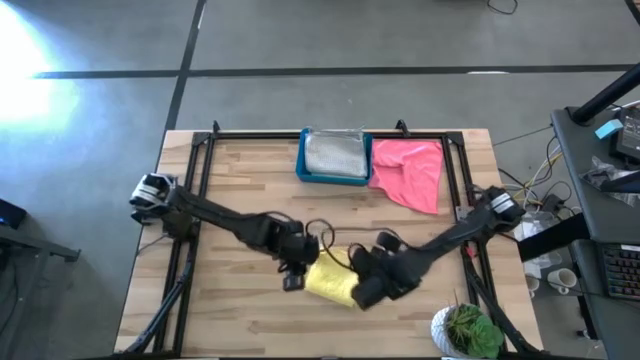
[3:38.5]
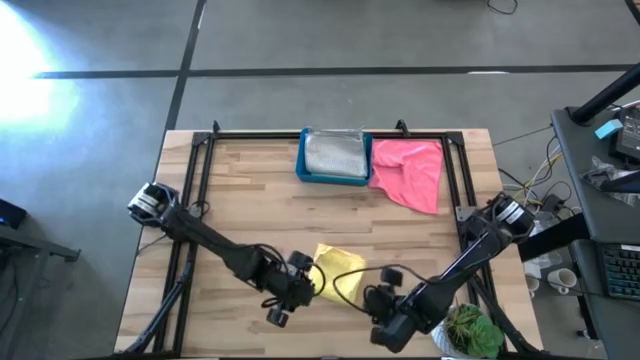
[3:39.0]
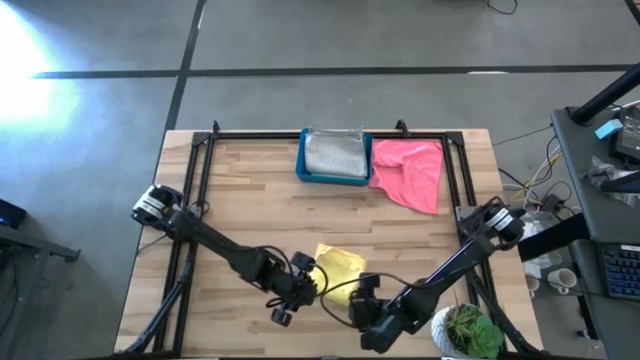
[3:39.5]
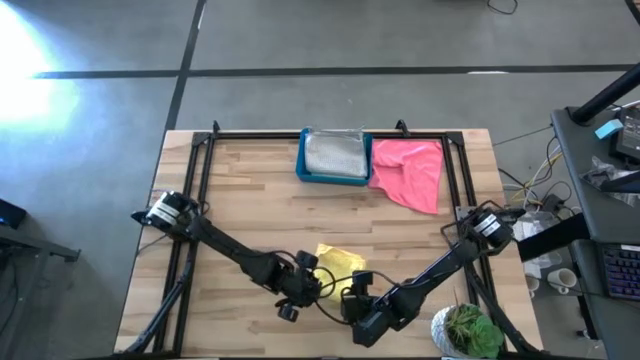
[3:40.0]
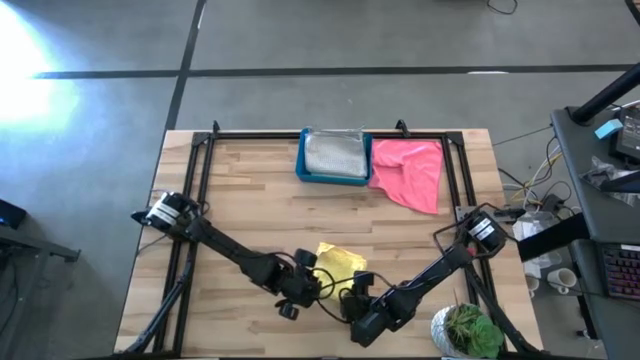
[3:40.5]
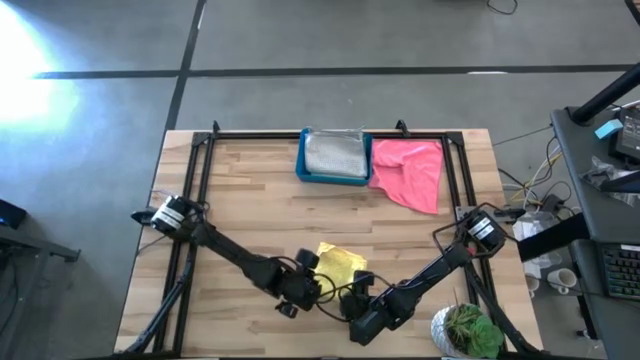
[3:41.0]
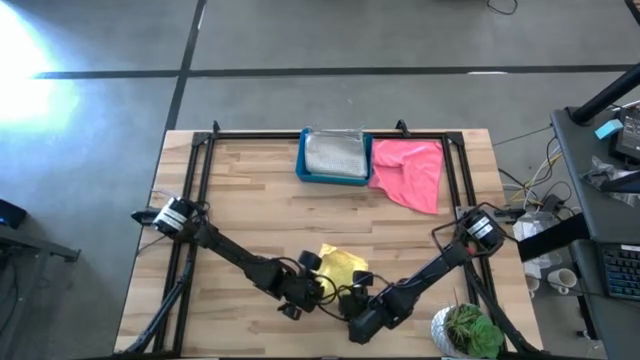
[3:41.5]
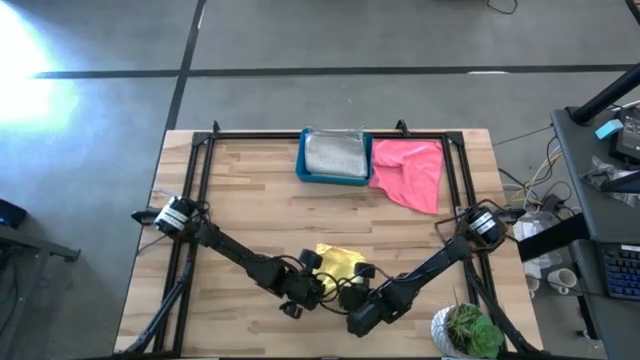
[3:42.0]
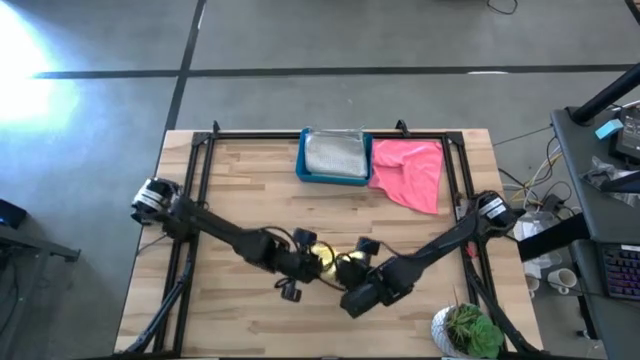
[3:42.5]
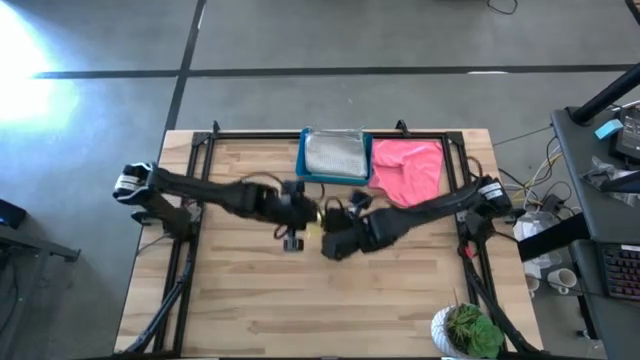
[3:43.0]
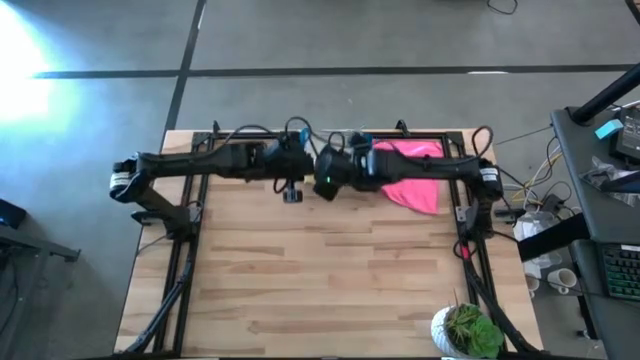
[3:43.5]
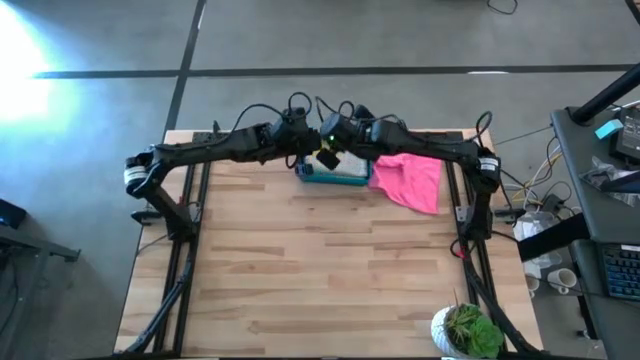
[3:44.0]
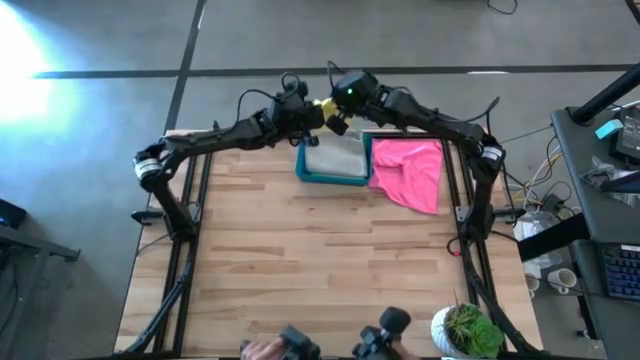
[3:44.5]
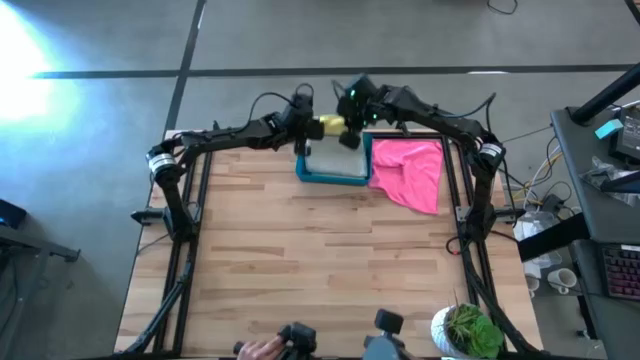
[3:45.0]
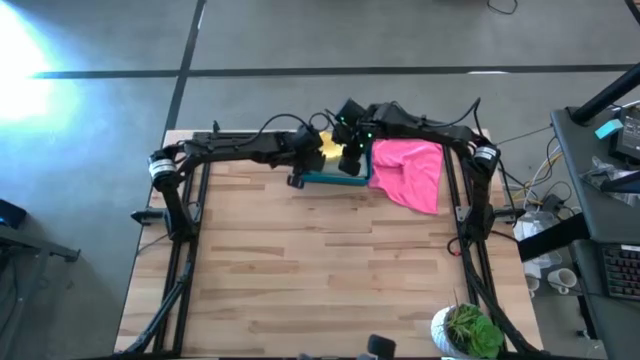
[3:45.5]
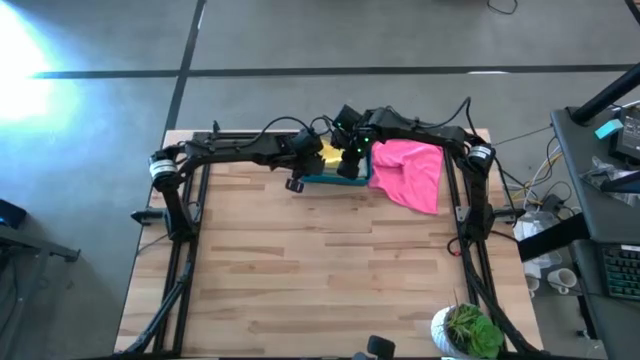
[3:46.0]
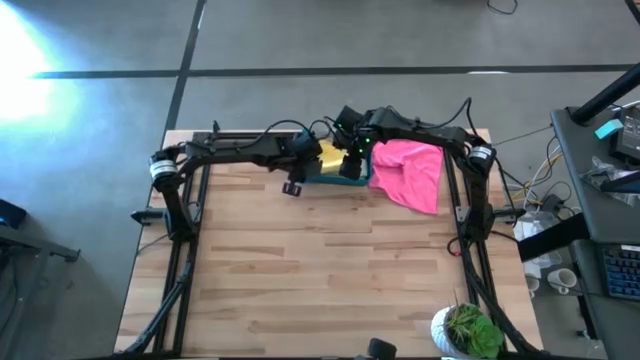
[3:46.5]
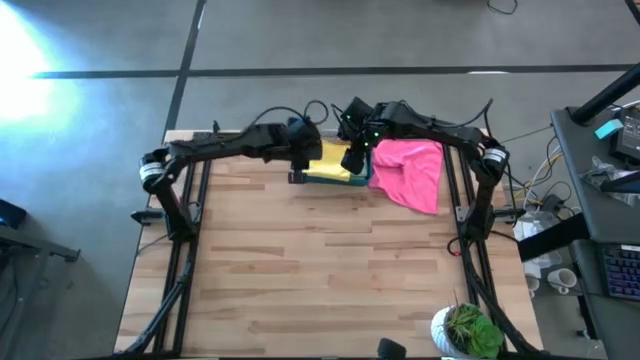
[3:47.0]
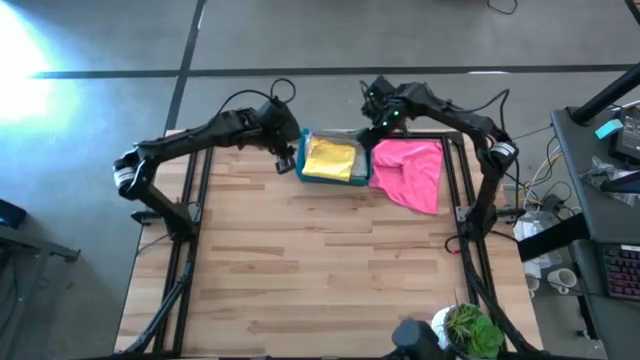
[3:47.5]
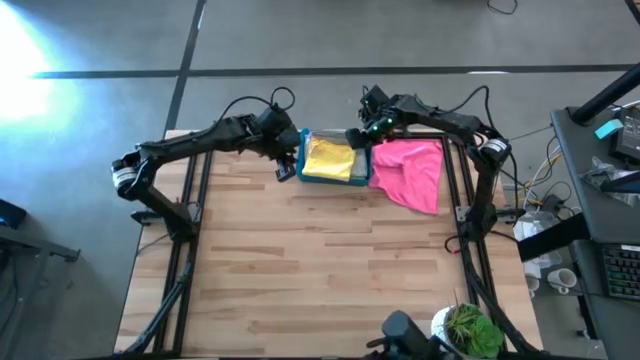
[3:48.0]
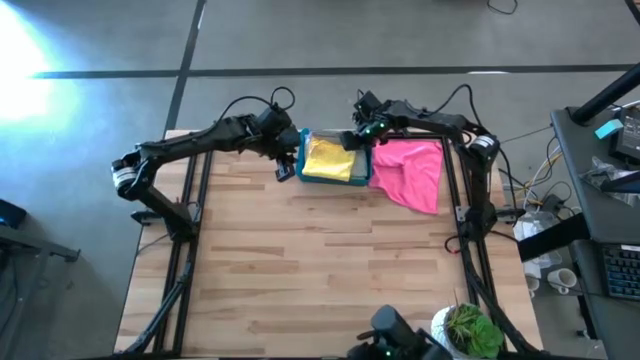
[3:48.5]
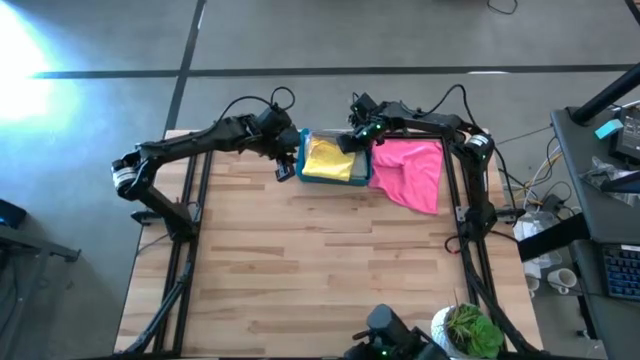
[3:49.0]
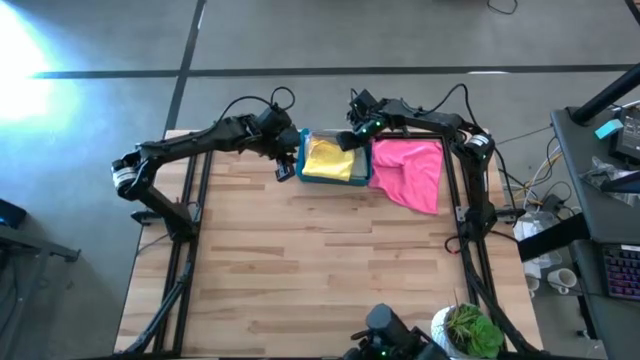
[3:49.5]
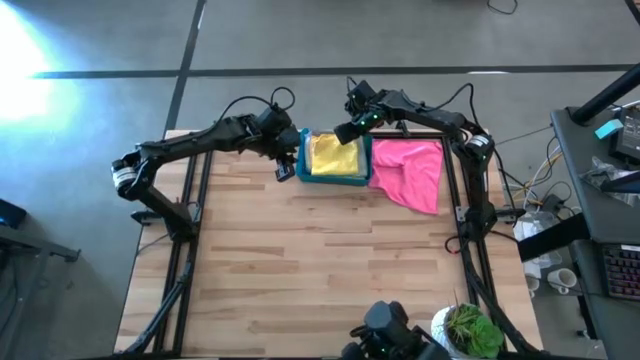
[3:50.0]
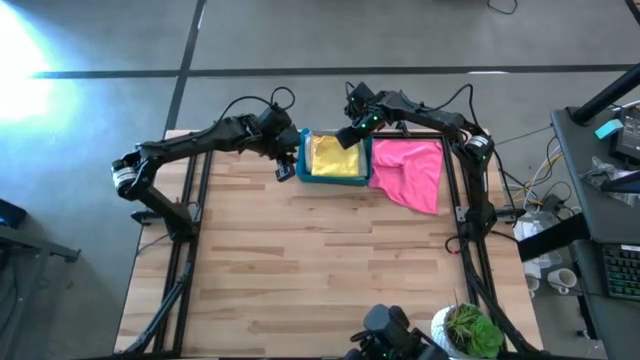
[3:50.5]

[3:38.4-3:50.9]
Task: Fold microfiber towels
Put the yellow microfiber cloth into the blue bin

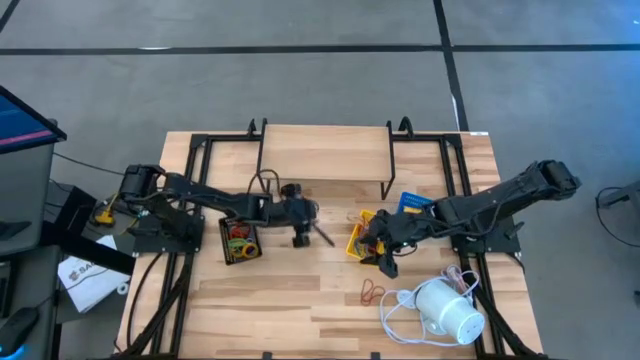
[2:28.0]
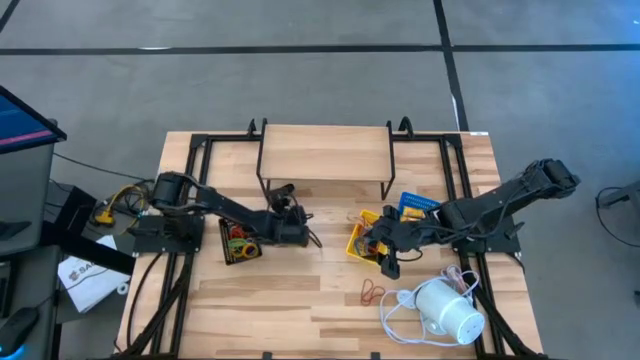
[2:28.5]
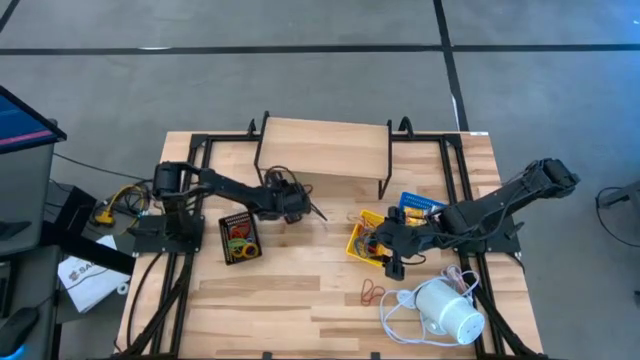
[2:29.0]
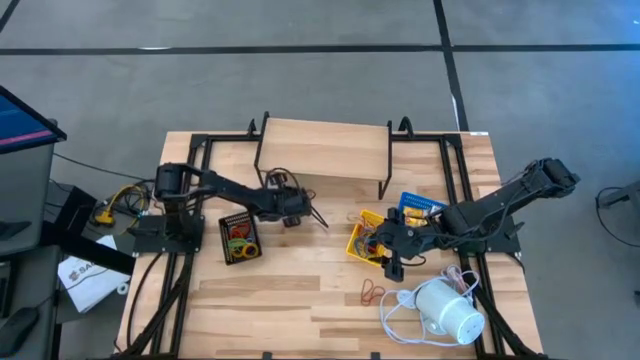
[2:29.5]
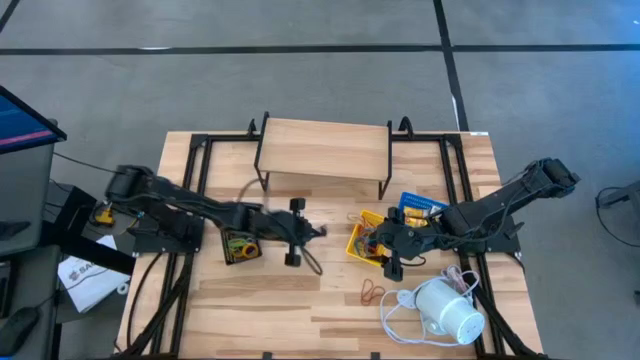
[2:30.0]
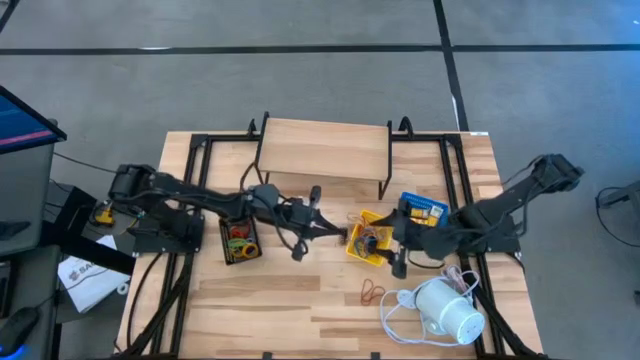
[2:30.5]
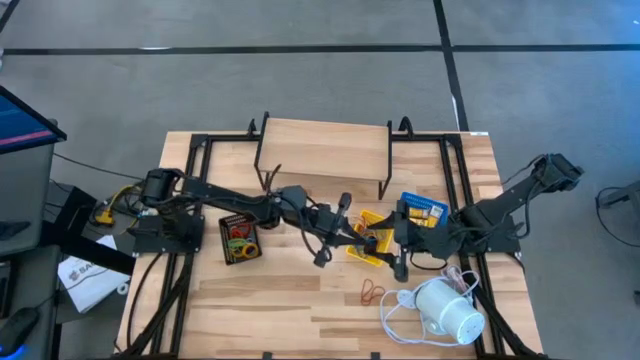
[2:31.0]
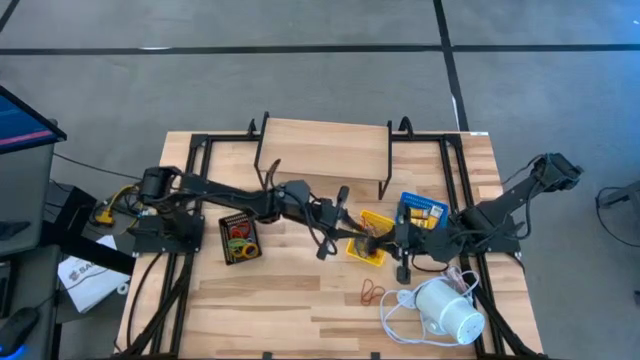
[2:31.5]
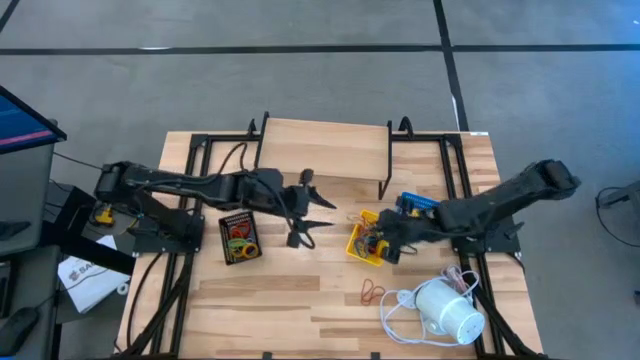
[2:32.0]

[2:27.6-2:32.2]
Task: Pick & Place Office Desk Supplies
Put the black rubber band into the yellow bin

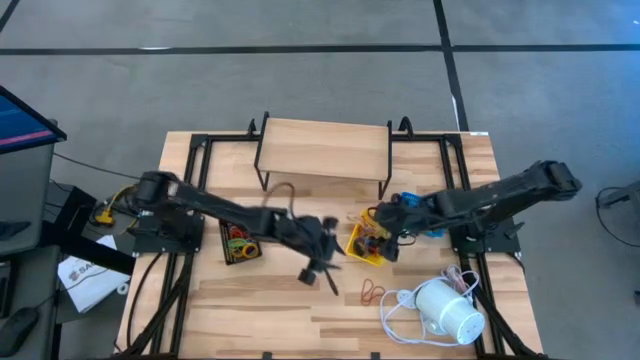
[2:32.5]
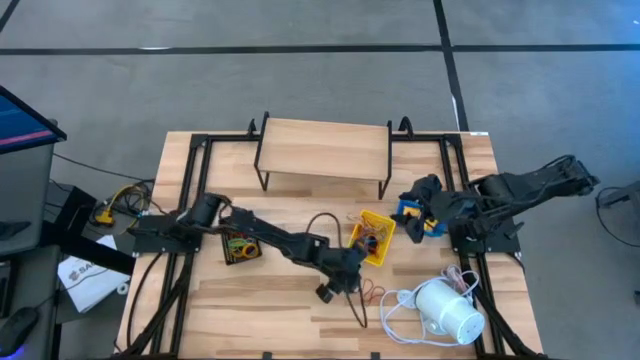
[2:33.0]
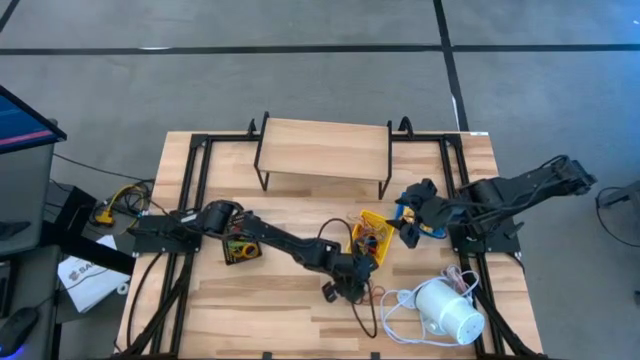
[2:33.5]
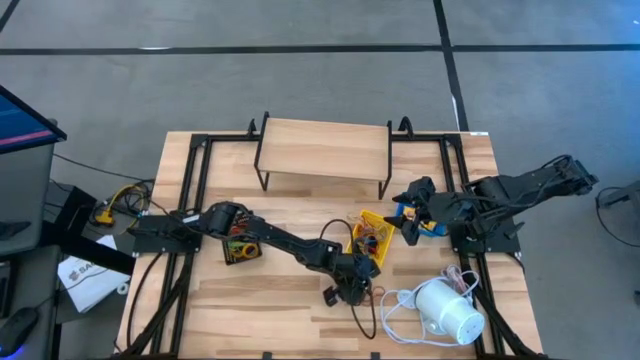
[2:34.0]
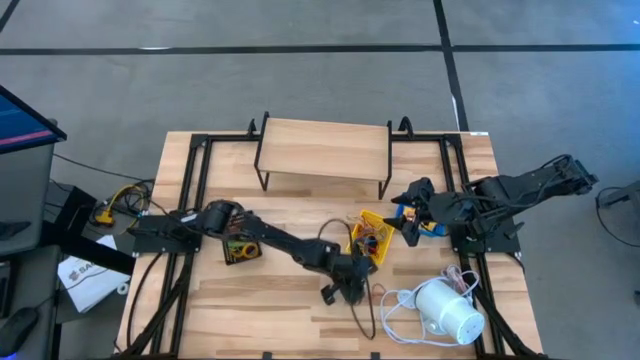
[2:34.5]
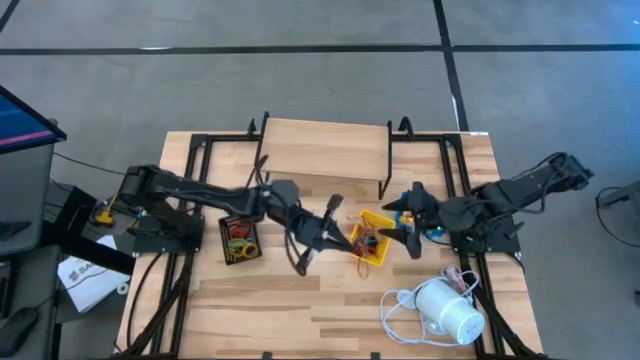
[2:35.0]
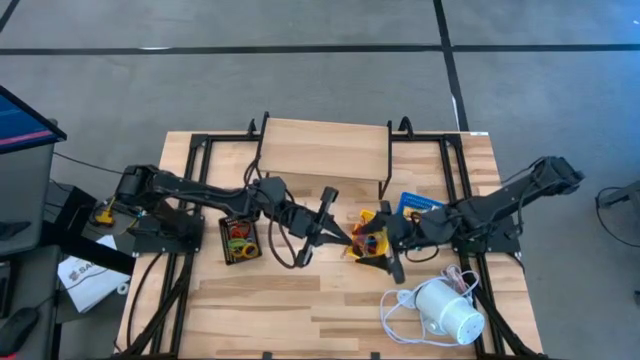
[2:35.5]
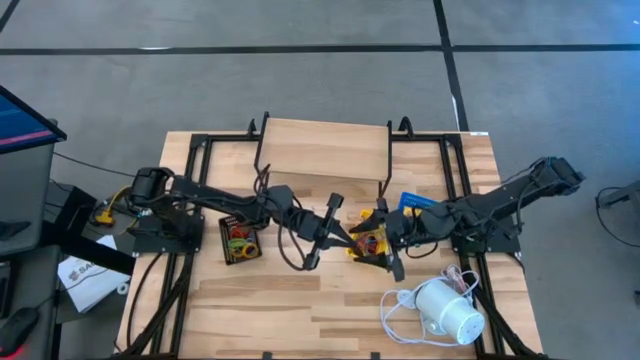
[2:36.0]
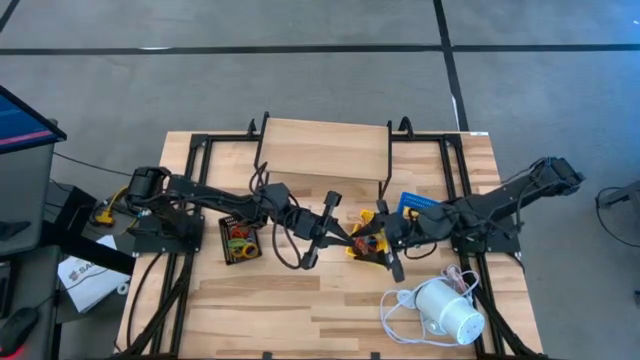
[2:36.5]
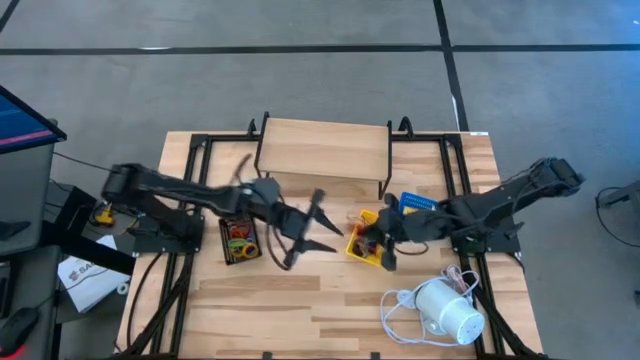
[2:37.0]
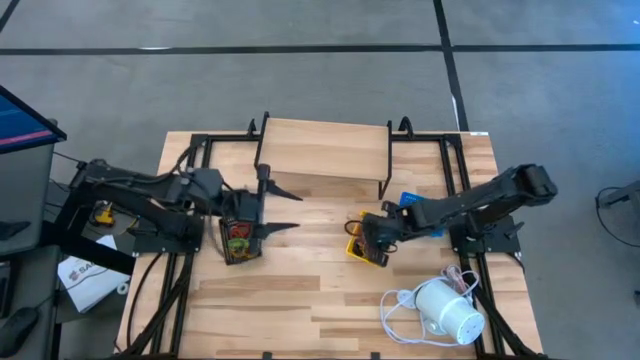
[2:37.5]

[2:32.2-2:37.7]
Put the red rubber band into the yellow bin
